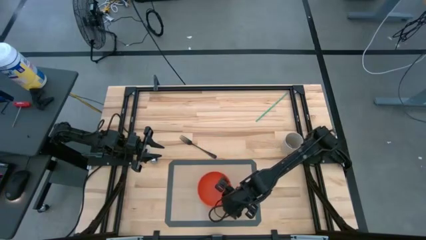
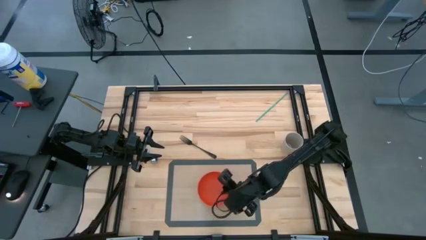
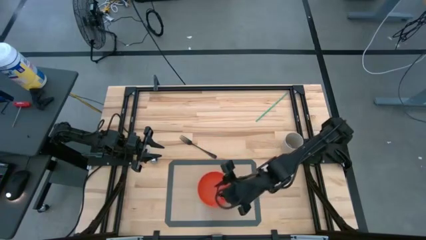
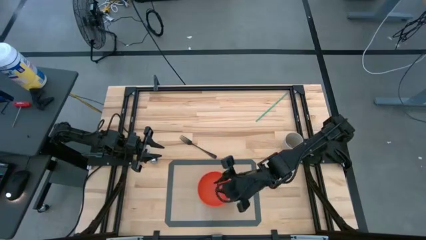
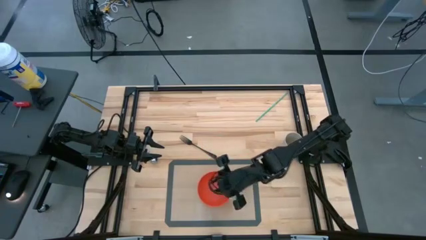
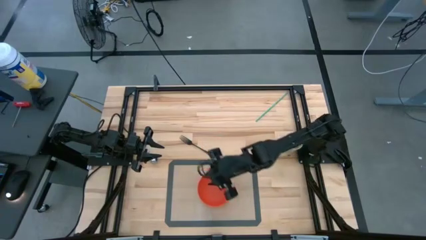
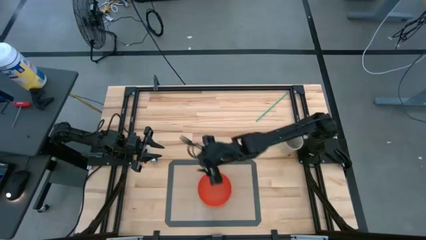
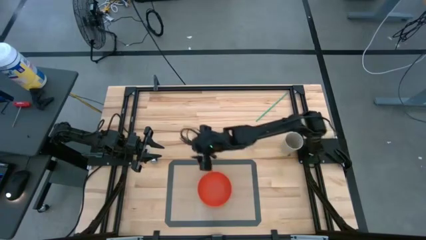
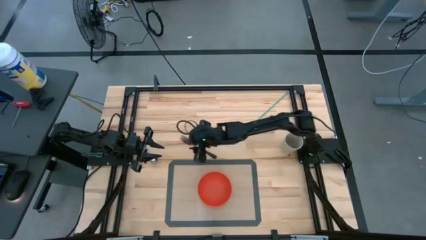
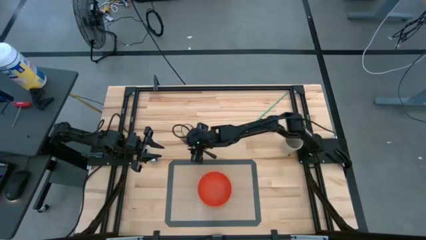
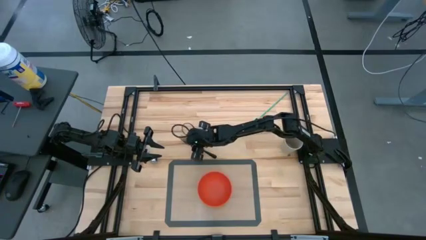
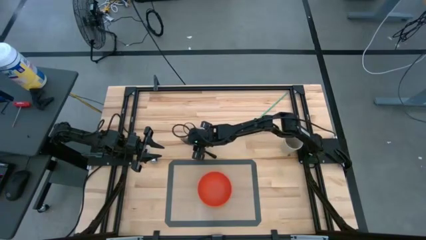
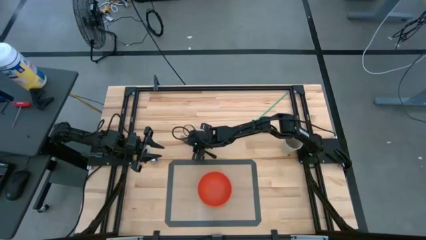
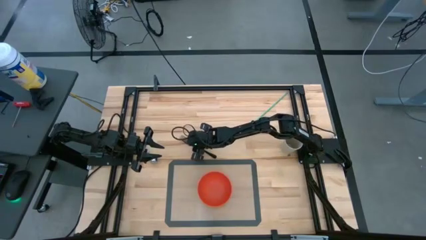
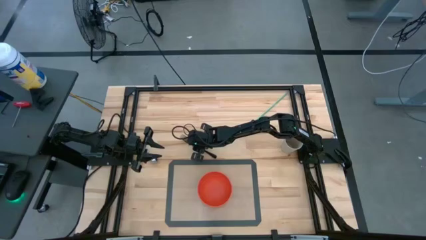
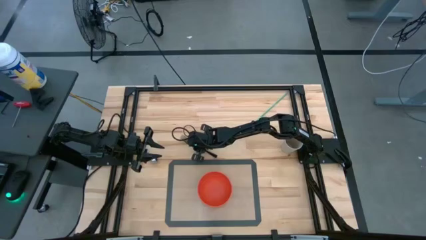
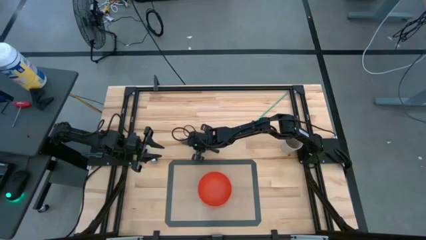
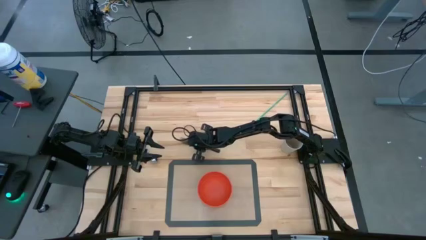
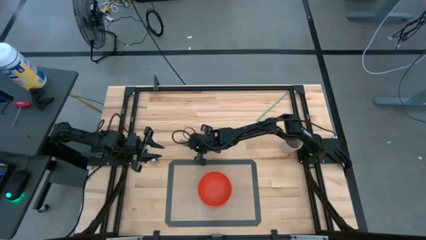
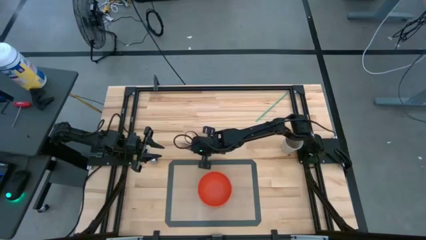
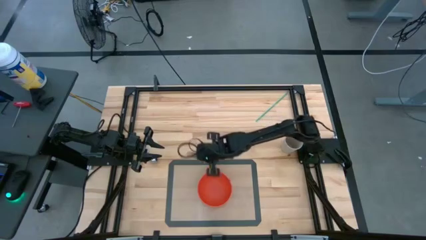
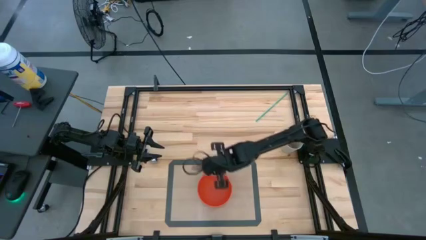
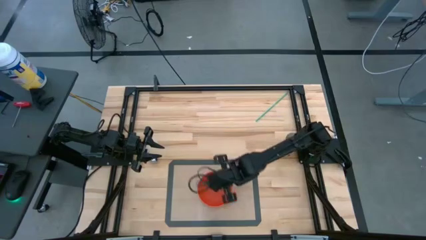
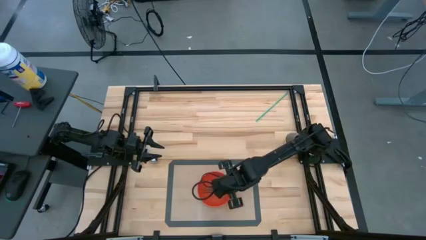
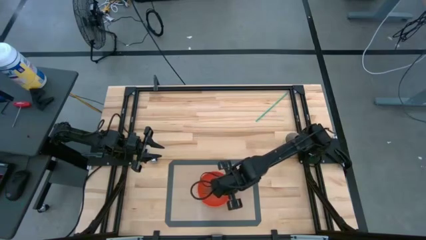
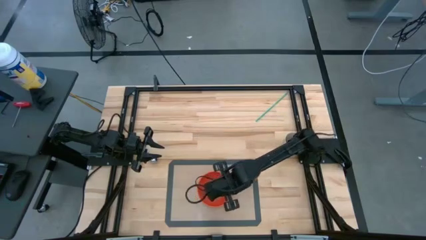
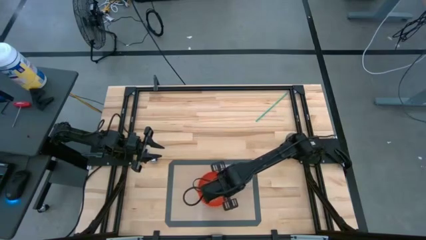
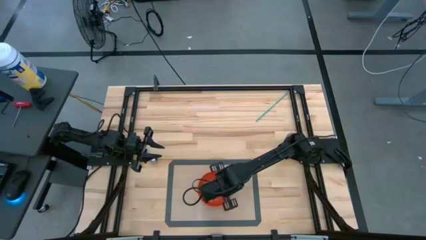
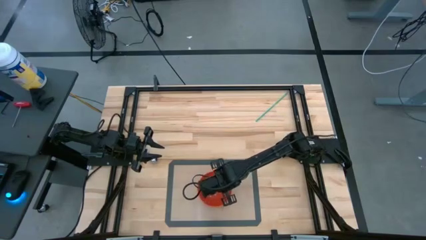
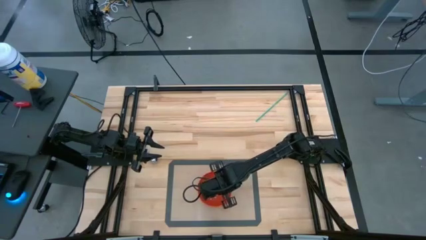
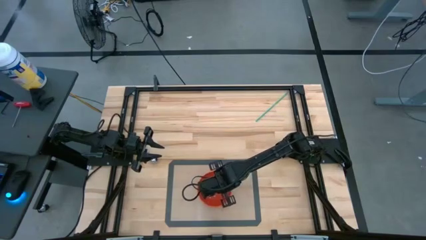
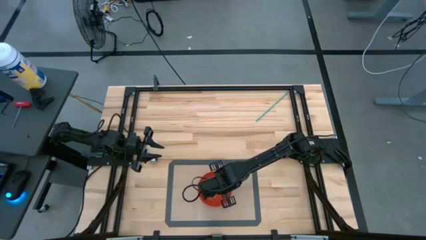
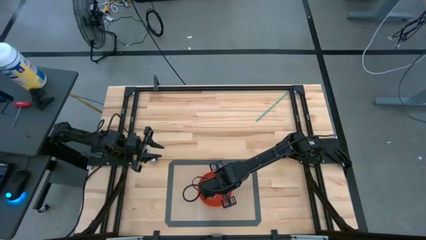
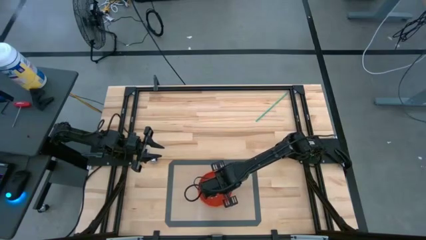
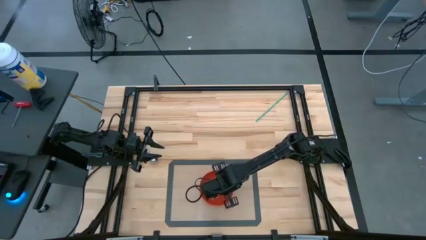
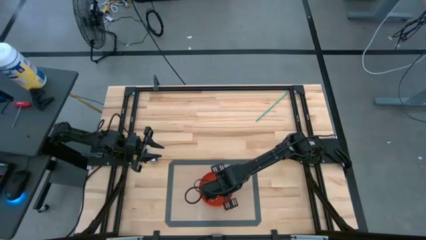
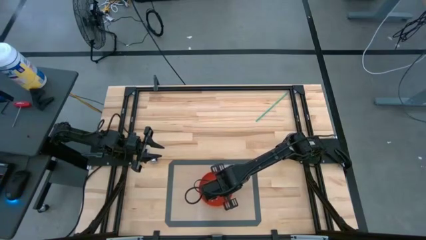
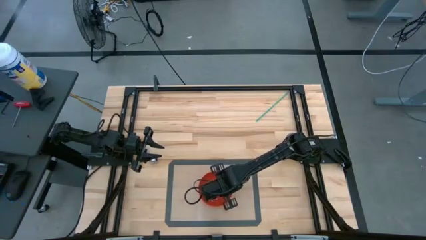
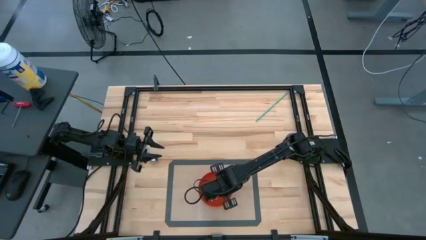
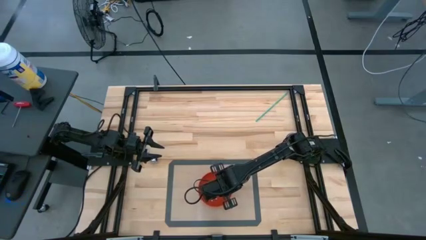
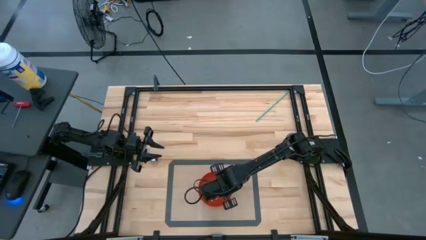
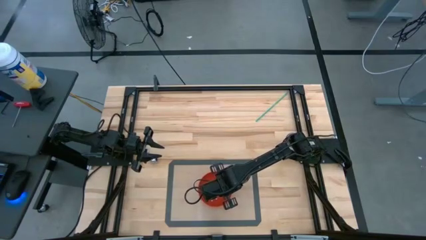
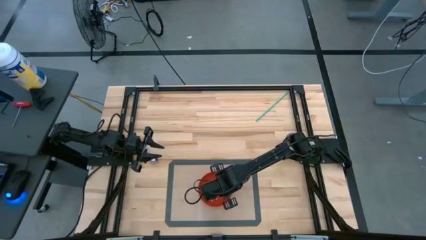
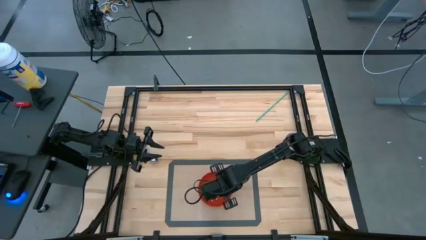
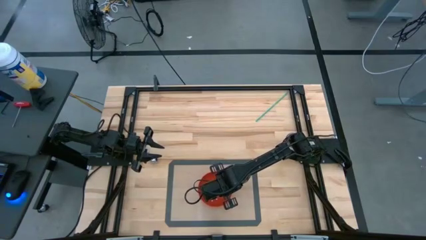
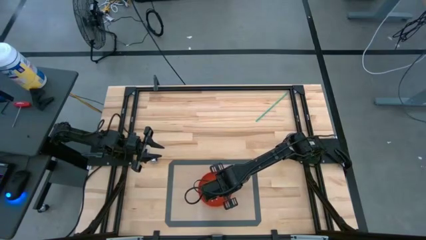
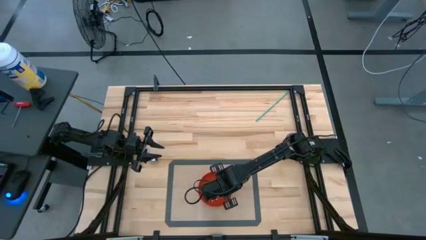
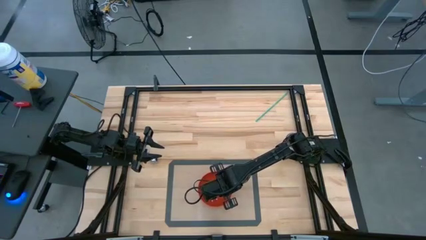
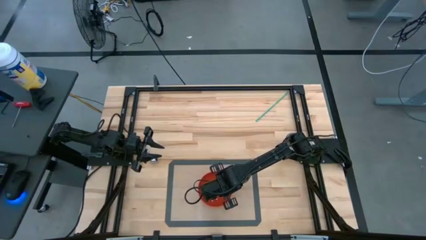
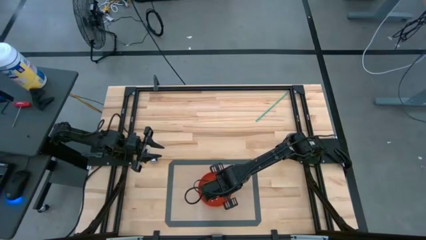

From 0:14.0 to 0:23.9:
Task: Pick & Place Utensil
Put the black fork into the orange bowl

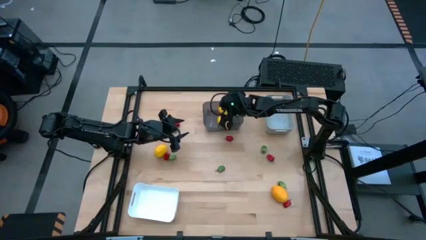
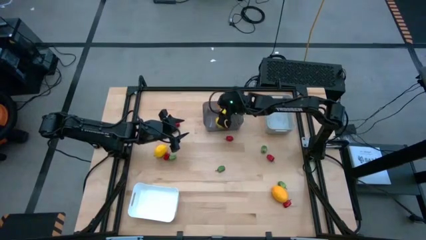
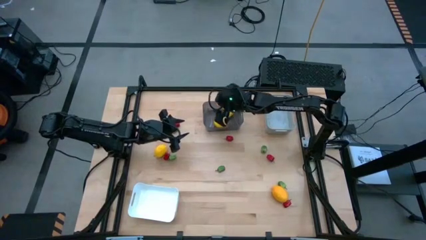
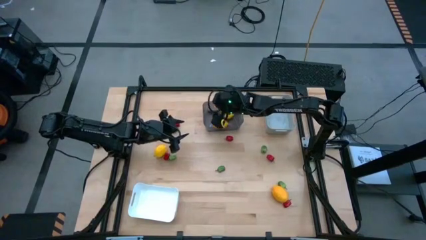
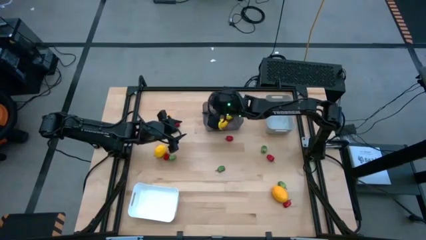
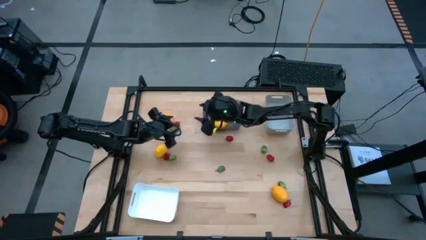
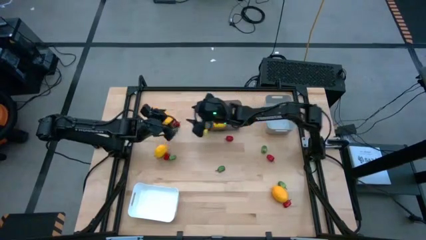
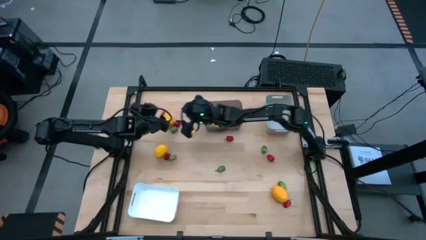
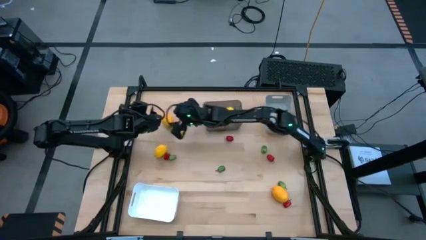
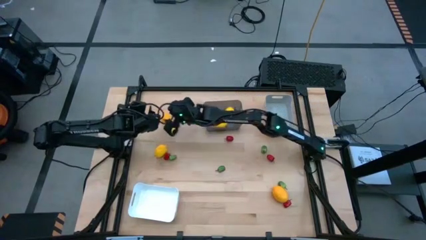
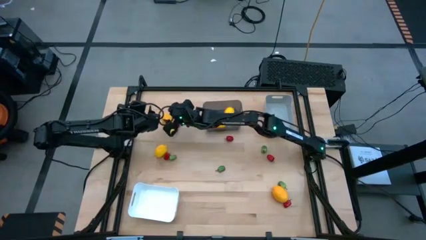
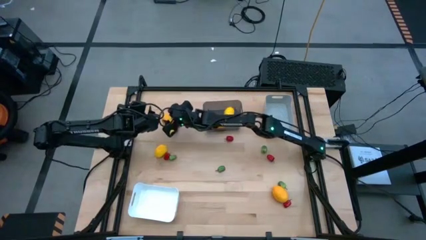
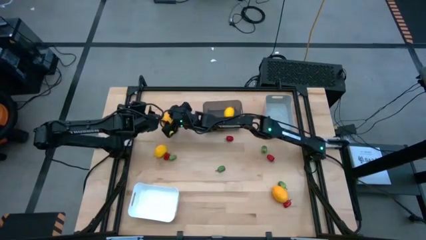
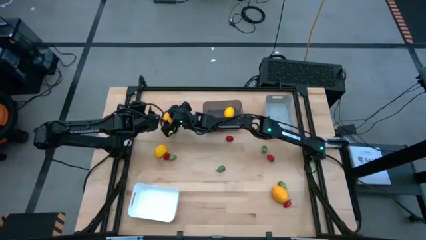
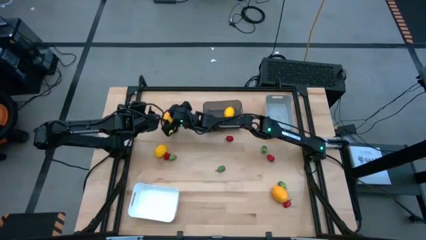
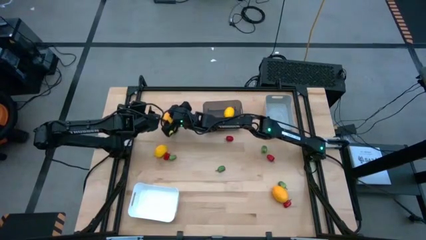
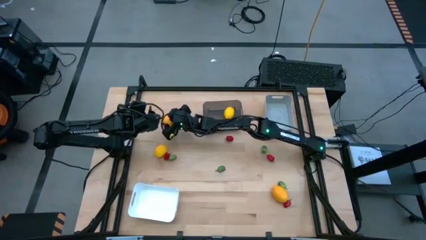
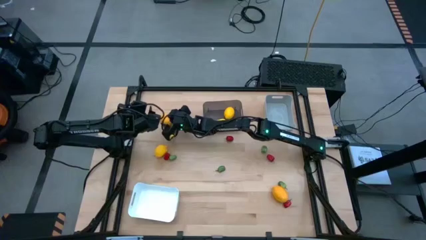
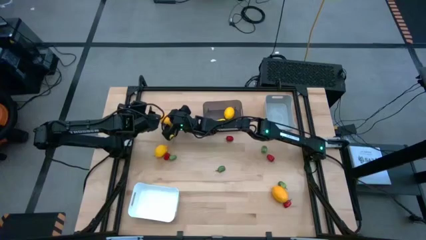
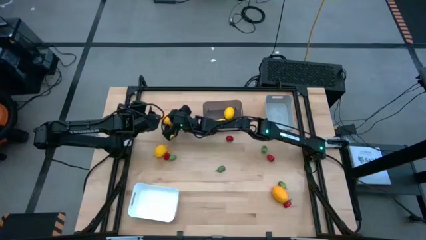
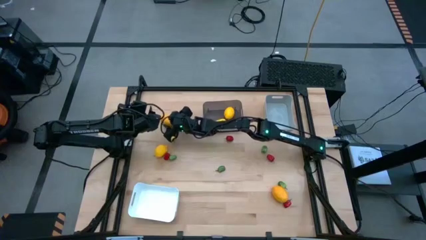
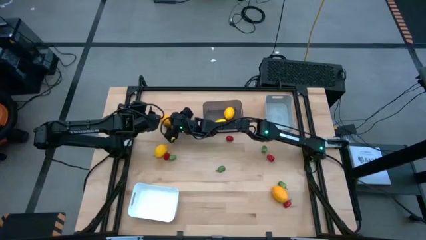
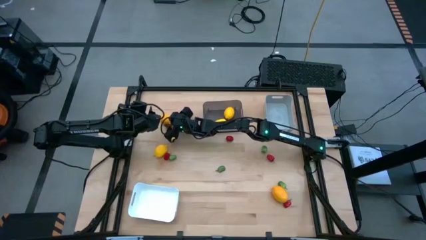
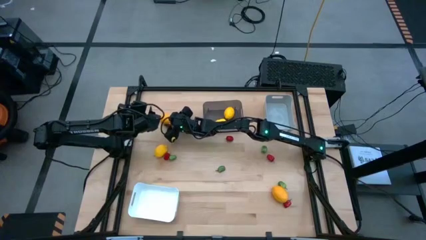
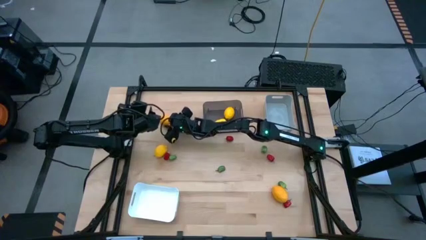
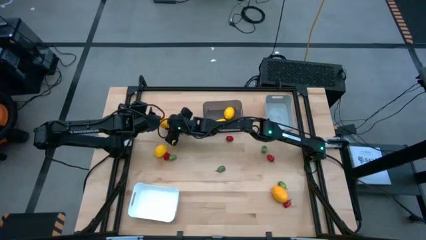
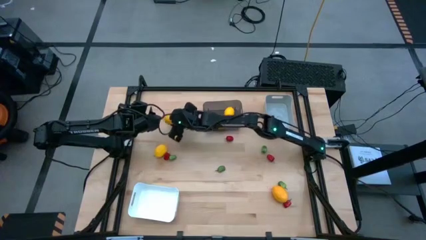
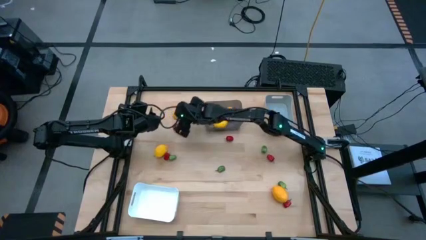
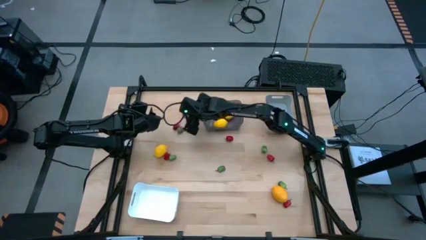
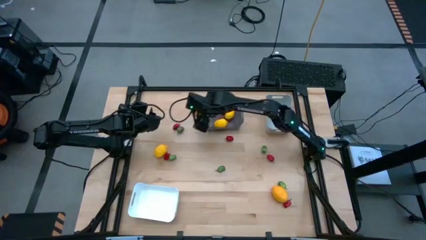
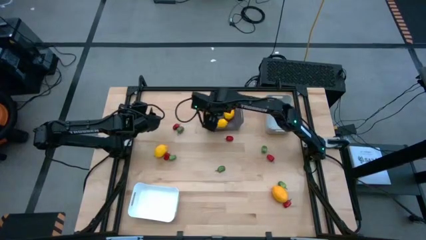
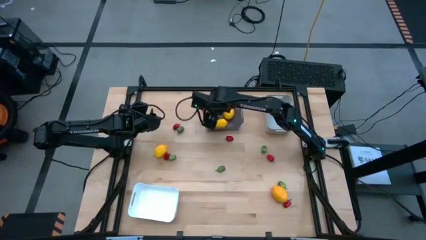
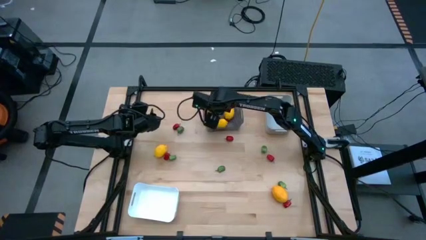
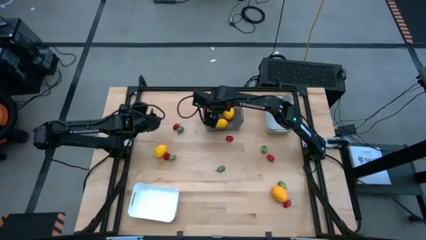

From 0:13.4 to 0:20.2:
Task: Sort produce into baskets
Put the lemon into the black bin
